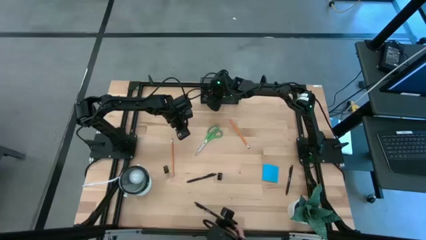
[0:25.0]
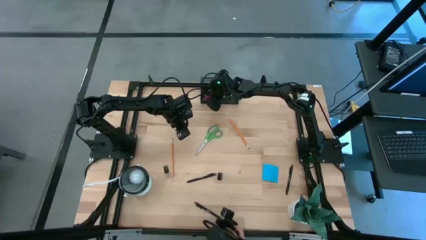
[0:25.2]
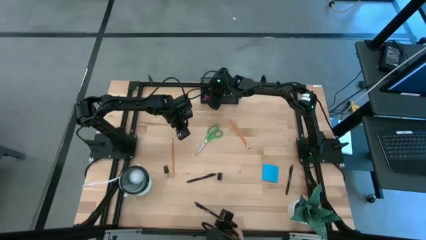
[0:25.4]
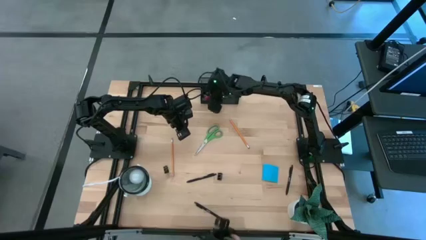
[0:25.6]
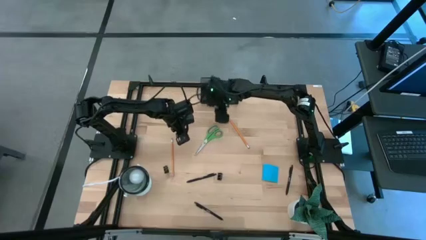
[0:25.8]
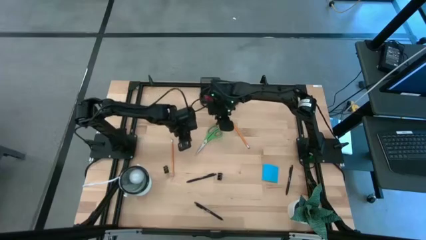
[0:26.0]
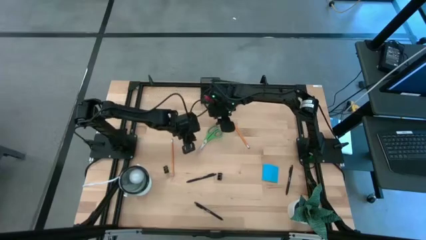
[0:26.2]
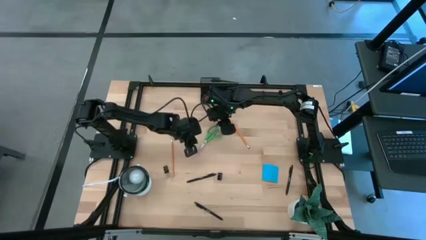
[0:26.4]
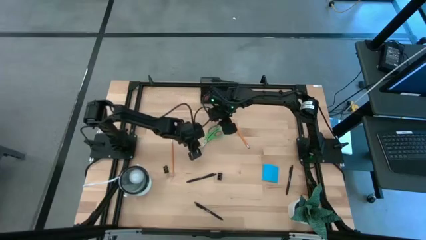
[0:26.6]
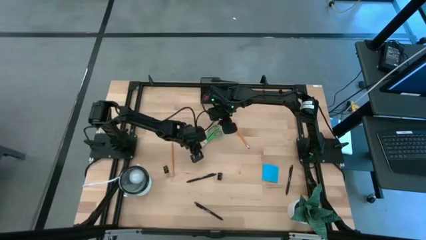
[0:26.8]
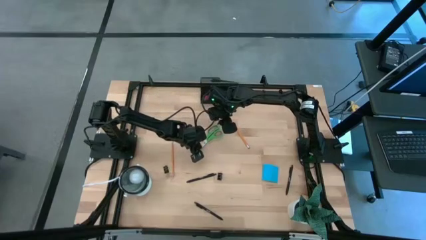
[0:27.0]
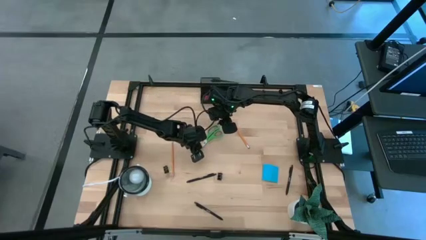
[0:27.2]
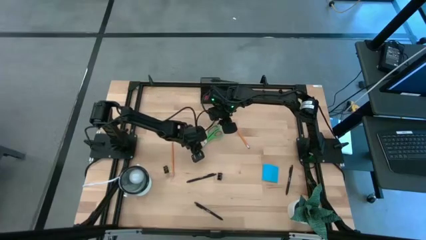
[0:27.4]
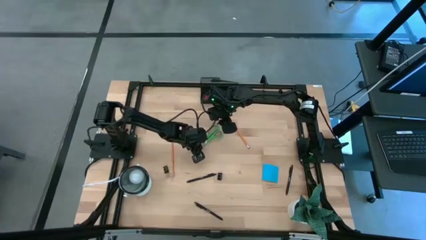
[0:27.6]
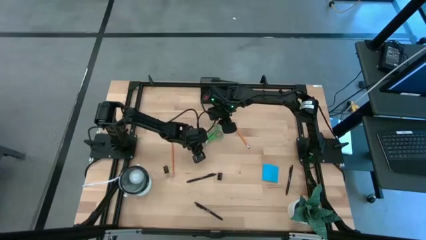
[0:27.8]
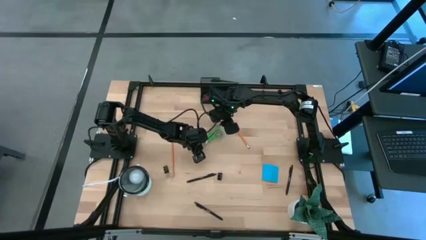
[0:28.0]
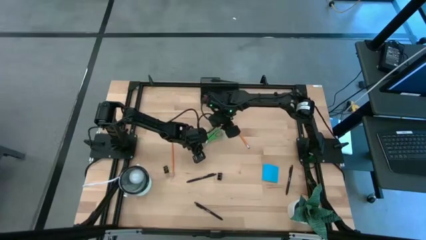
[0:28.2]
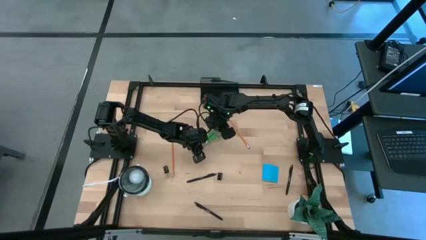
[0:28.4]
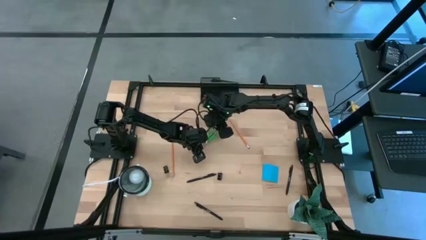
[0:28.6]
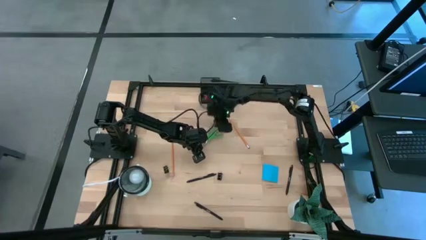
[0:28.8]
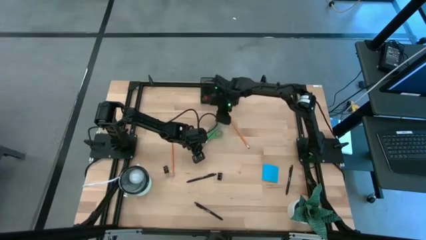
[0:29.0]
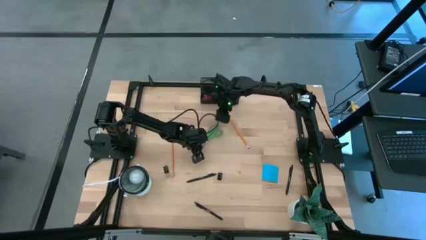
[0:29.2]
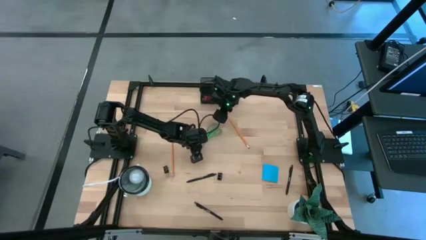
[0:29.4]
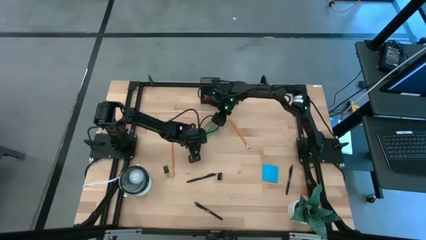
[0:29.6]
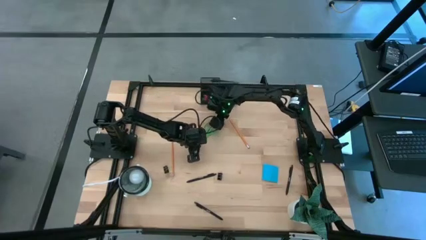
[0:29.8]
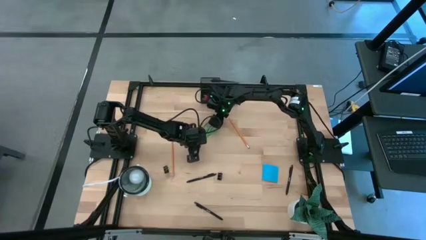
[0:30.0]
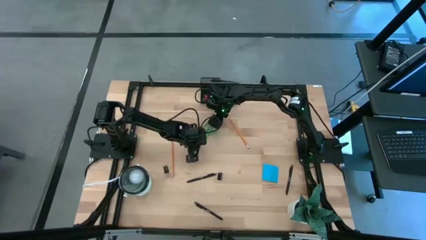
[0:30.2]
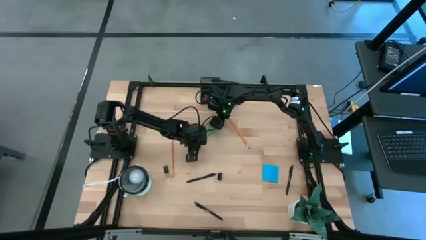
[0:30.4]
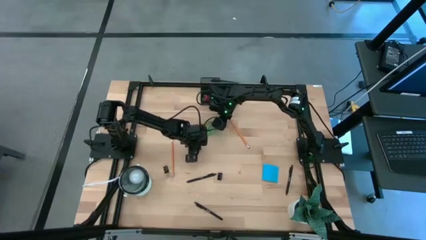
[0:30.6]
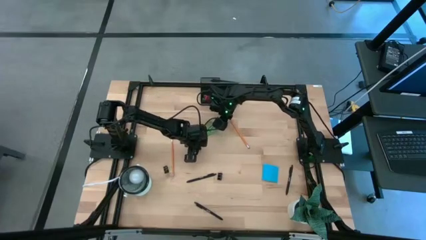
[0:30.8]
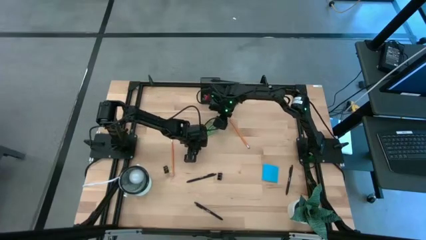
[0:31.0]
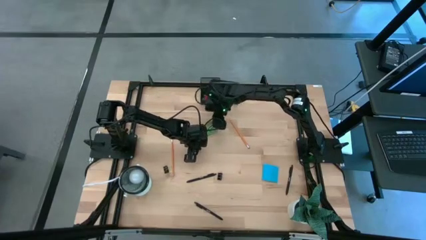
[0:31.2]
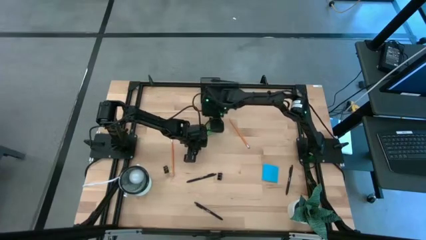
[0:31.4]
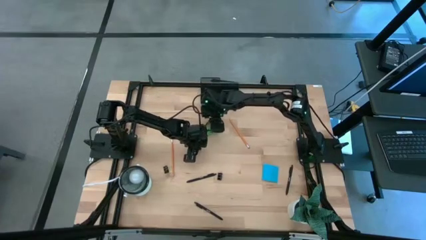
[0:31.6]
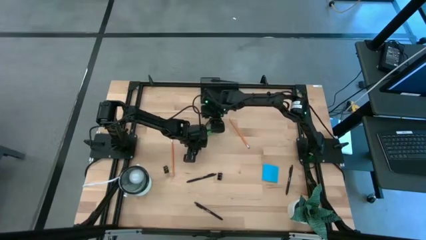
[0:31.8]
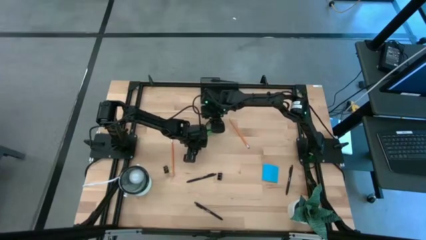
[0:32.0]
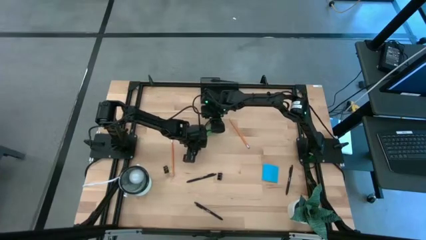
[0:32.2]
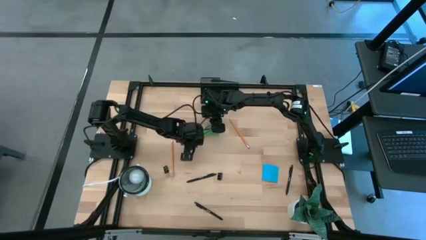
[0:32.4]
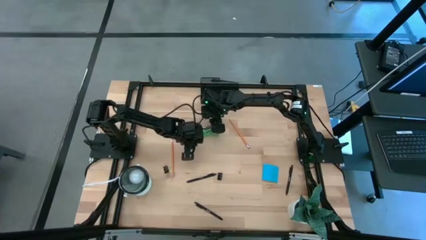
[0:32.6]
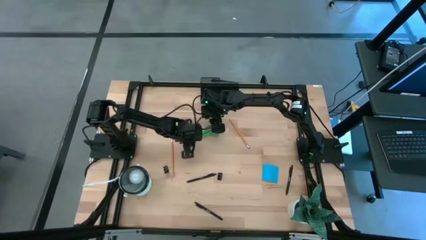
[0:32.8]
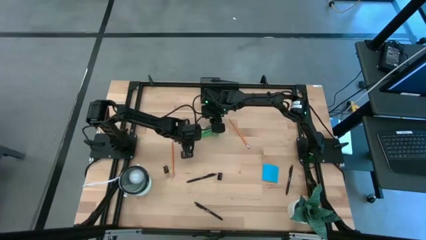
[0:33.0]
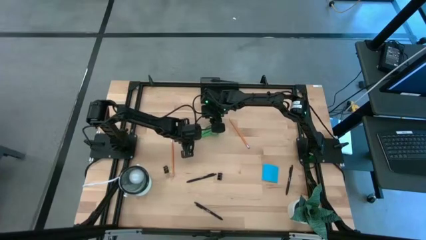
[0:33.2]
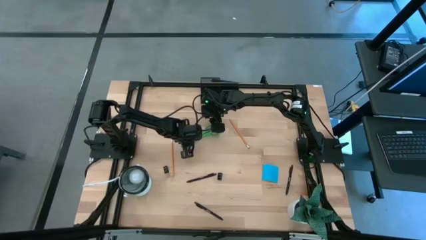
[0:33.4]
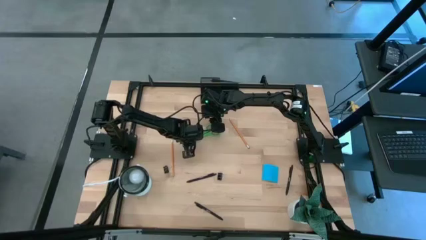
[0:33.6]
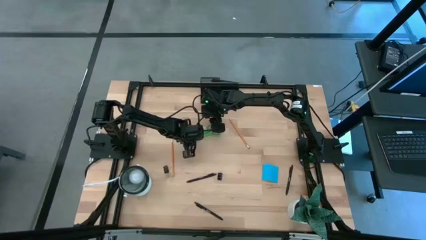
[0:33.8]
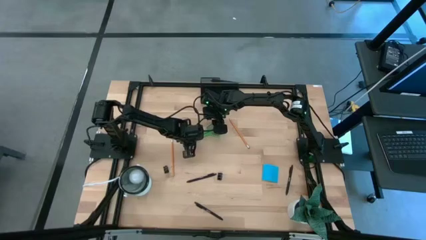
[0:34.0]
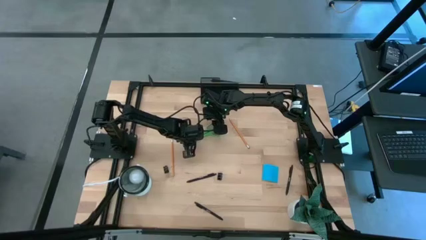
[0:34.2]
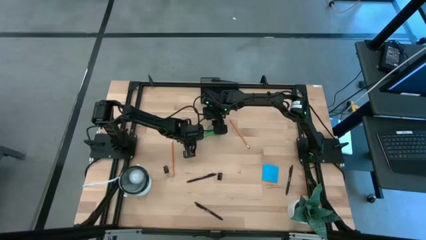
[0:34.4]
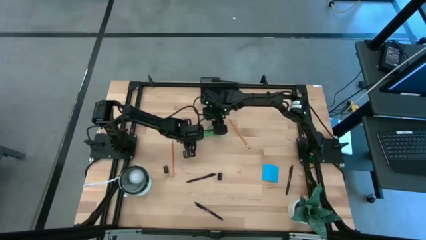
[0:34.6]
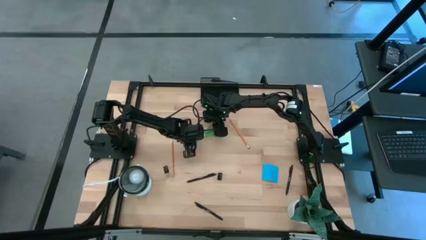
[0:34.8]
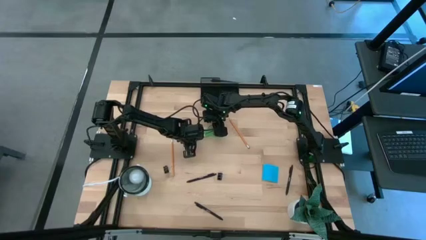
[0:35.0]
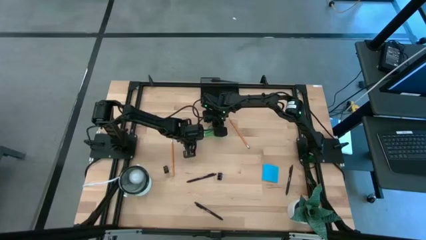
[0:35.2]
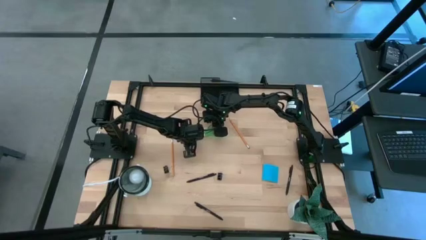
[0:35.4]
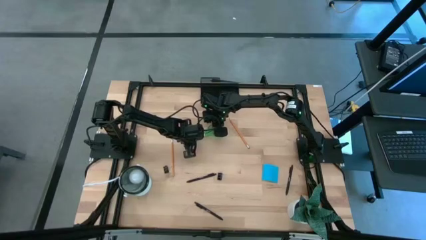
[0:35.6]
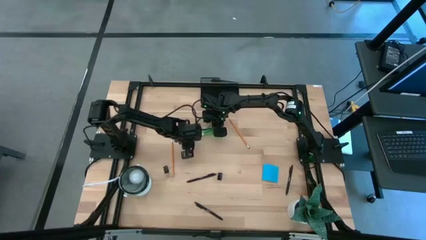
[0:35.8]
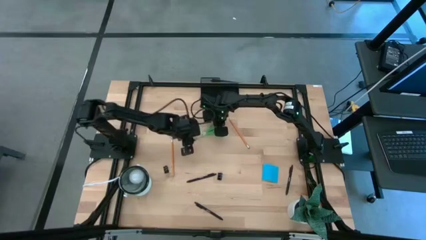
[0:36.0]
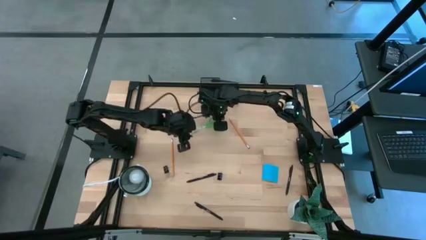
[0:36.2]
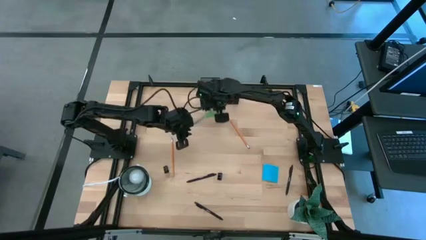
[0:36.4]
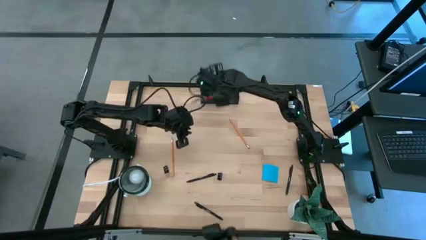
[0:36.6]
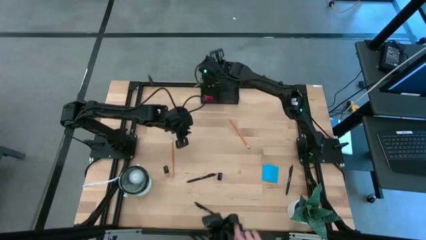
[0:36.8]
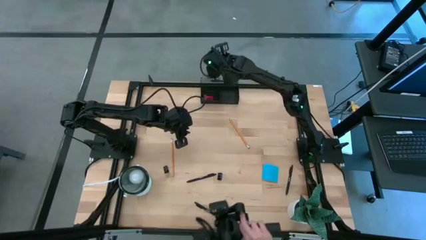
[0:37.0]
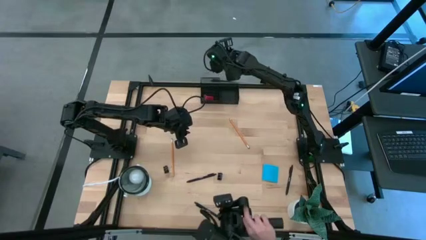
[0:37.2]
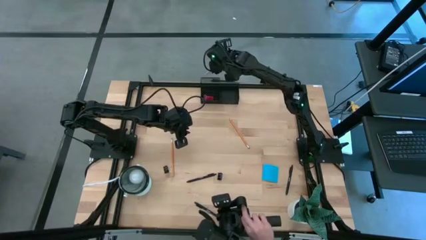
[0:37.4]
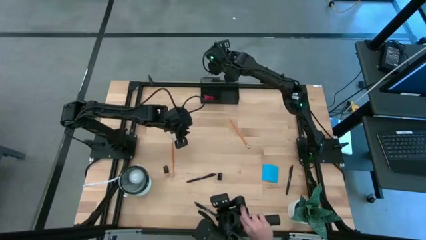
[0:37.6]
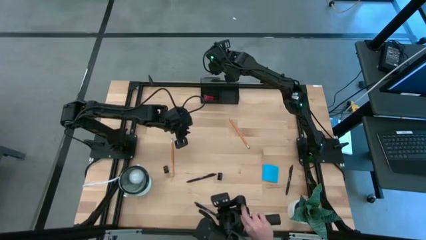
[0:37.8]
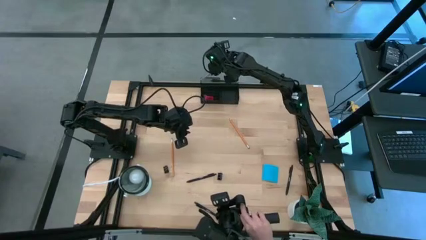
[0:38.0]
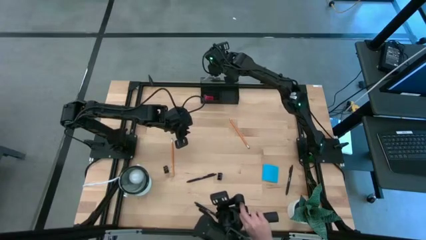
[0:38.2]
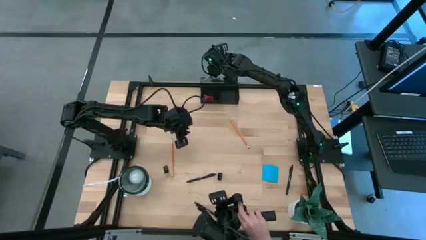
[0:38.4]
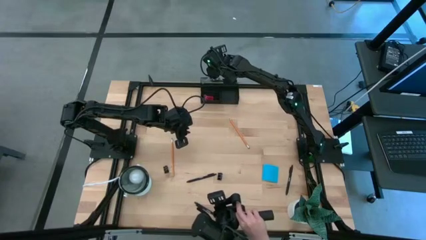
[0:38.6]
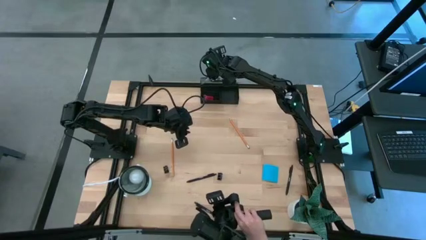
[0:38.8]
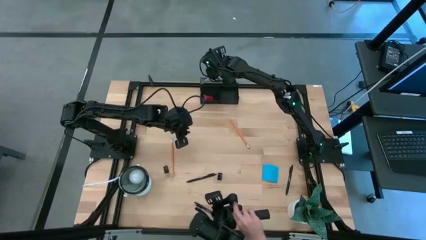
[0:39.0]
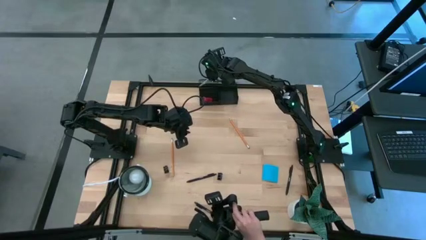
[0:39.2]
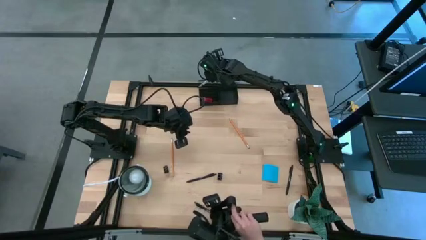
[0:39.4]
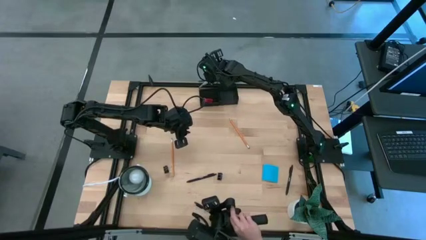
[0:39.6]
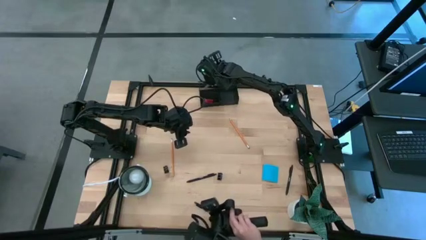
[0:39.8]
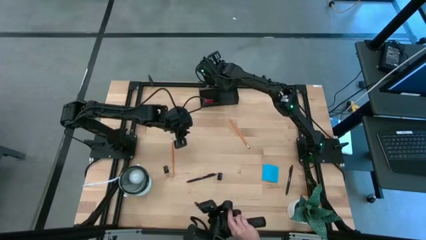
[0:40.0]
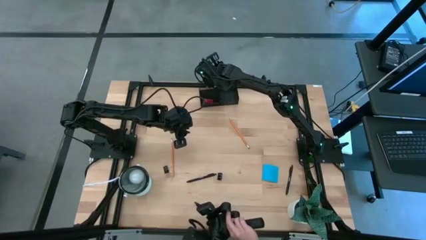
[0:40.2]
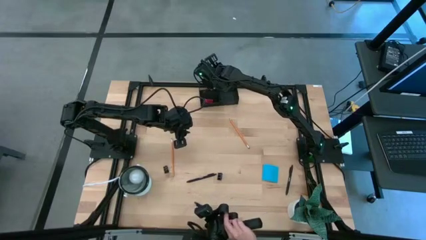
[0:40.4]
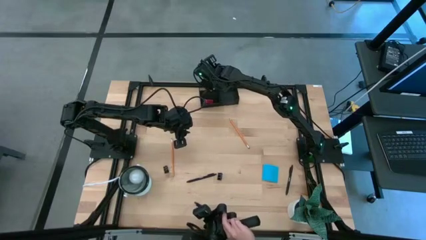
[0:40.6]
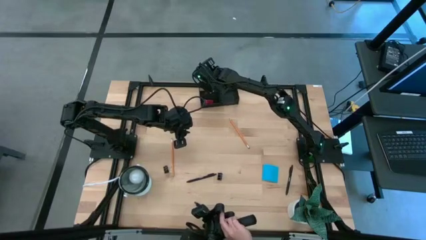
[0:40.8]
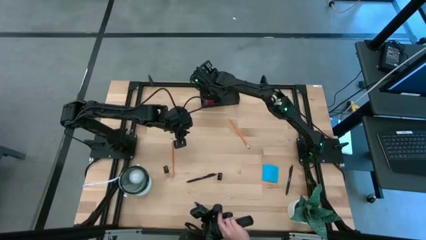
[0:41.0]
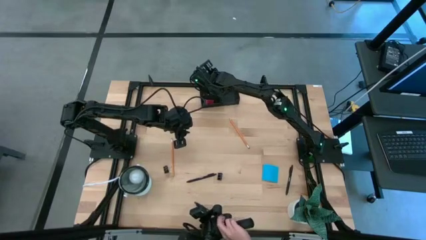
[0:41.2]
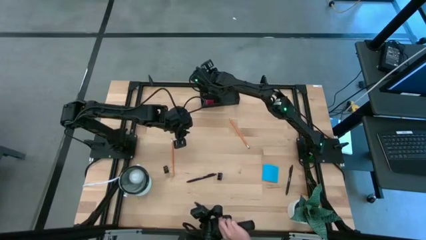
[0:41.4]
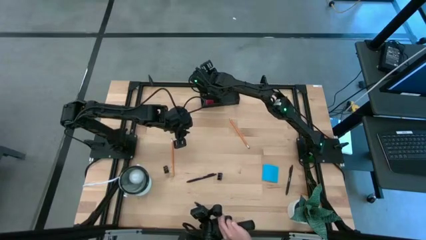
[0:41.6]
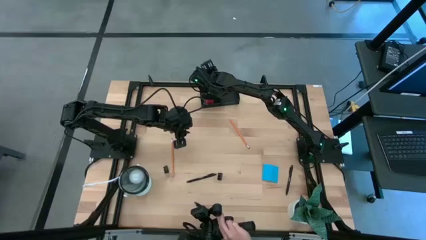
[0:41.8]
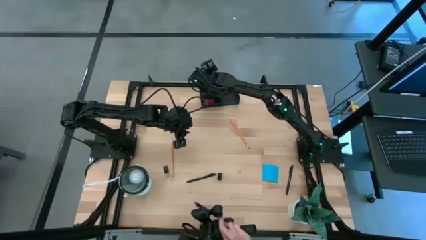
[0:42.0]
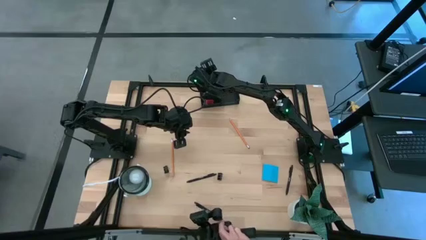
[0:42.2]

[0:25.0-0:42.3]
Task: Pick and place office supplies into organizer
Put the green scissors into the desk organizer
